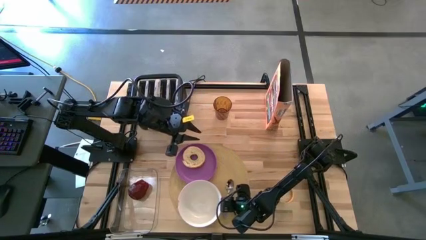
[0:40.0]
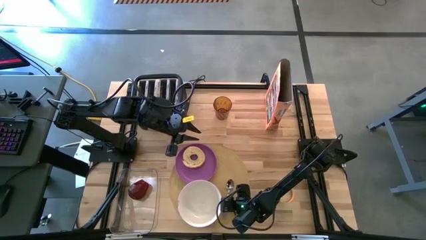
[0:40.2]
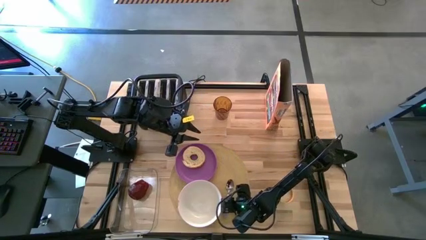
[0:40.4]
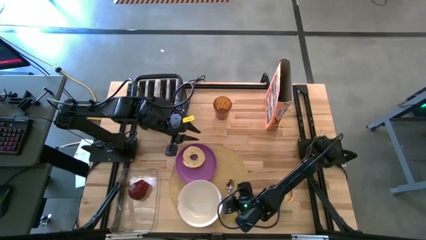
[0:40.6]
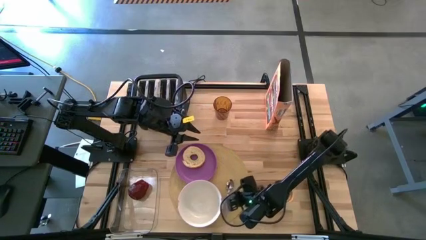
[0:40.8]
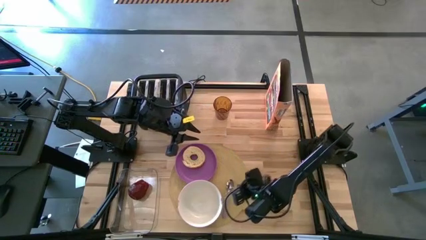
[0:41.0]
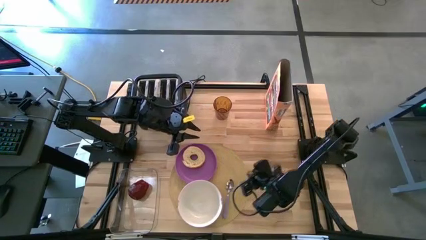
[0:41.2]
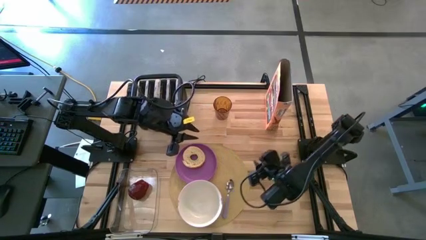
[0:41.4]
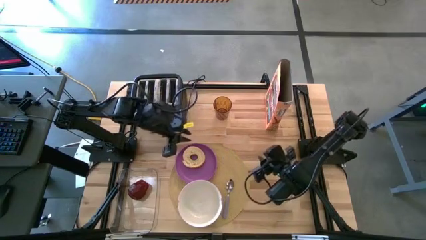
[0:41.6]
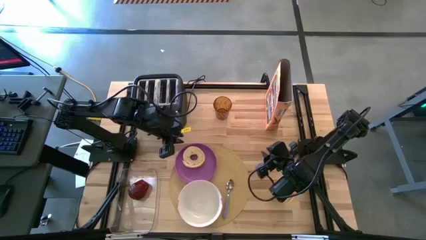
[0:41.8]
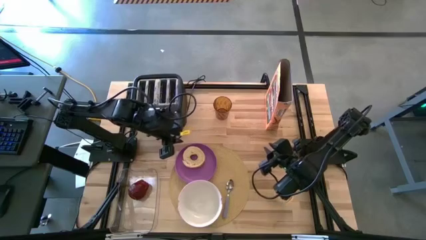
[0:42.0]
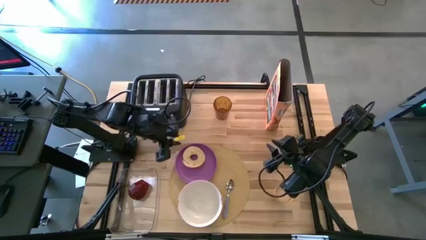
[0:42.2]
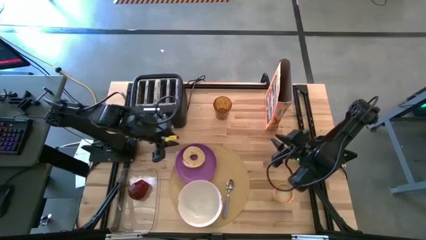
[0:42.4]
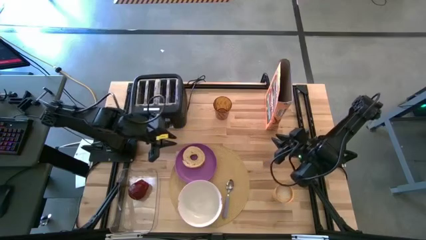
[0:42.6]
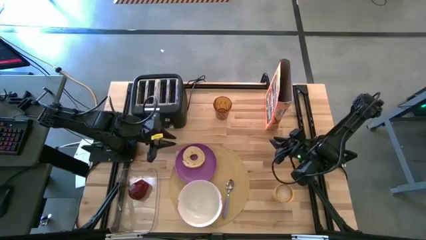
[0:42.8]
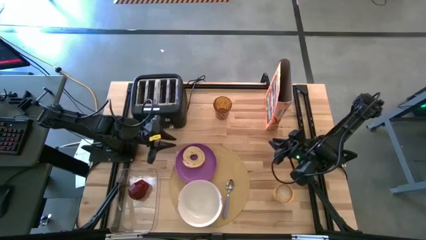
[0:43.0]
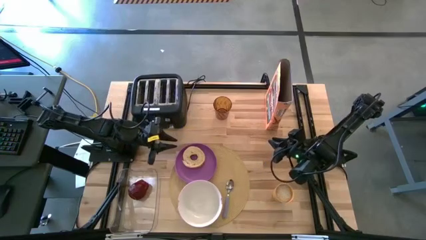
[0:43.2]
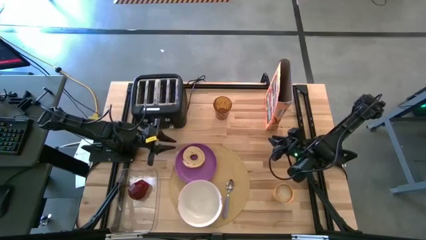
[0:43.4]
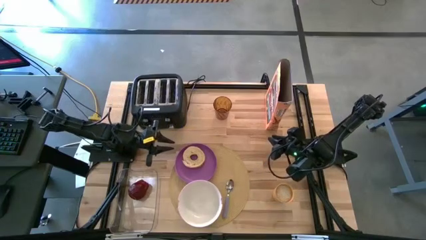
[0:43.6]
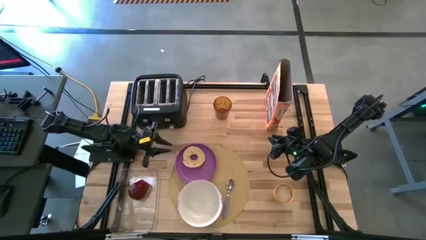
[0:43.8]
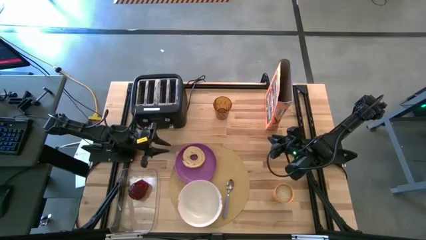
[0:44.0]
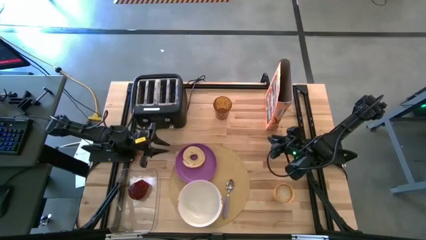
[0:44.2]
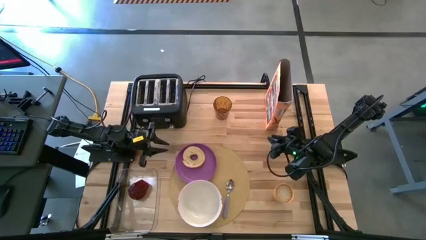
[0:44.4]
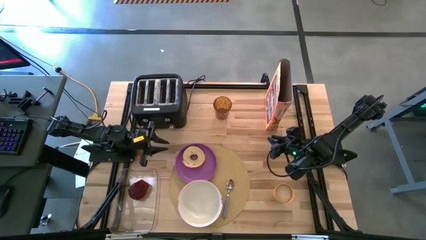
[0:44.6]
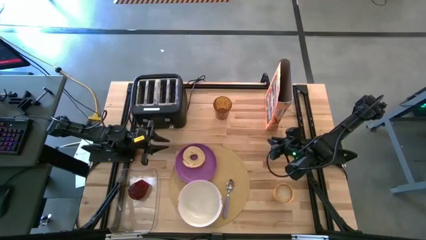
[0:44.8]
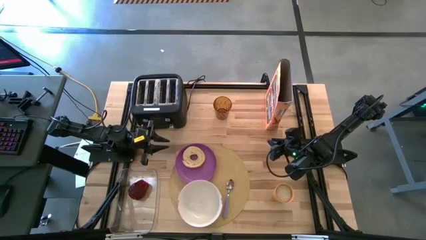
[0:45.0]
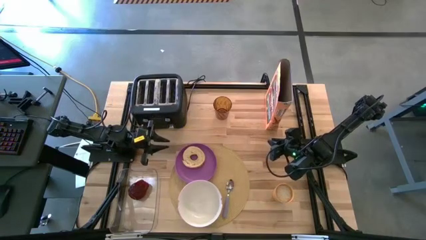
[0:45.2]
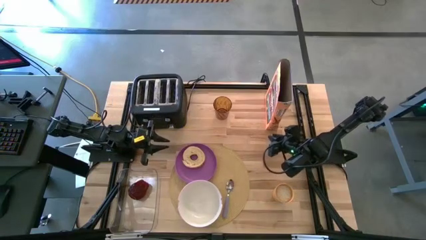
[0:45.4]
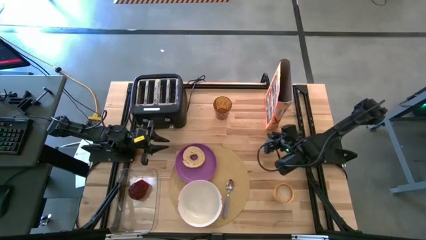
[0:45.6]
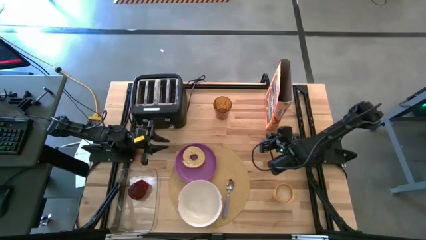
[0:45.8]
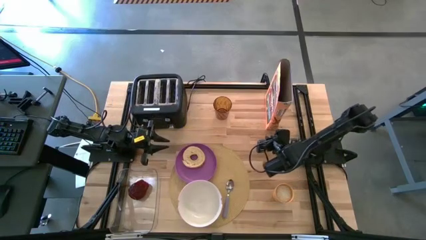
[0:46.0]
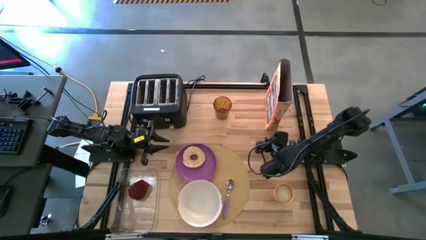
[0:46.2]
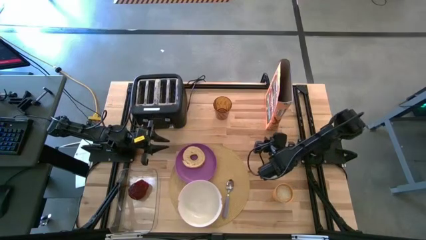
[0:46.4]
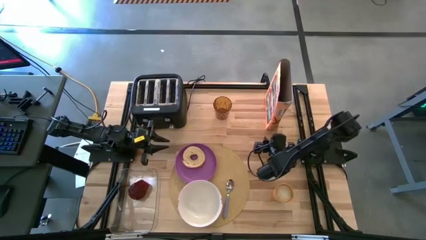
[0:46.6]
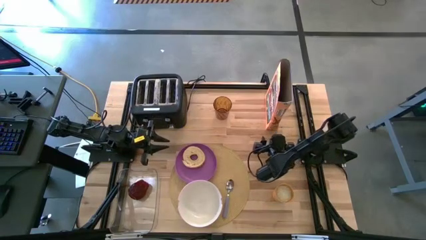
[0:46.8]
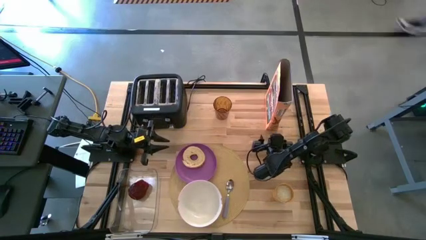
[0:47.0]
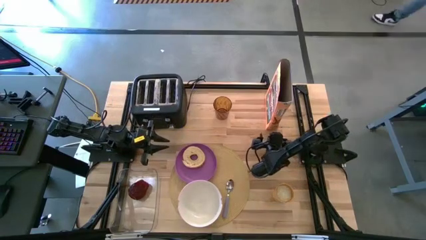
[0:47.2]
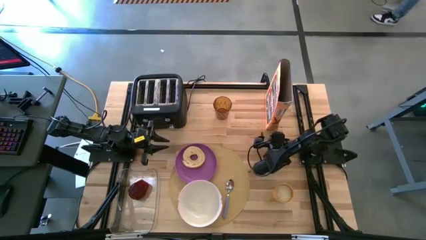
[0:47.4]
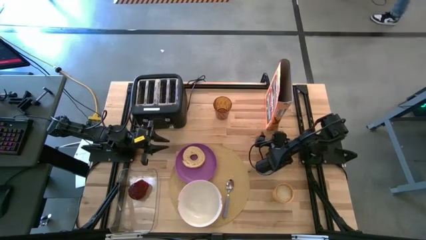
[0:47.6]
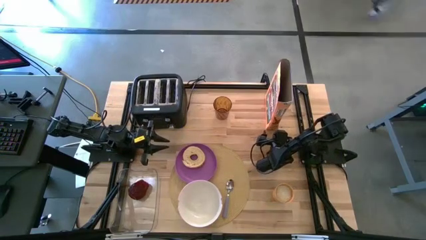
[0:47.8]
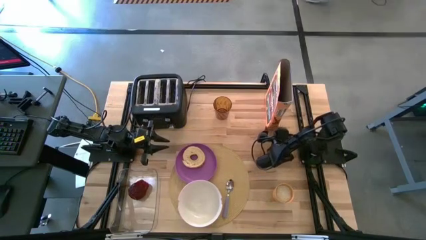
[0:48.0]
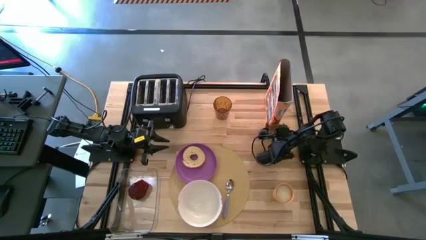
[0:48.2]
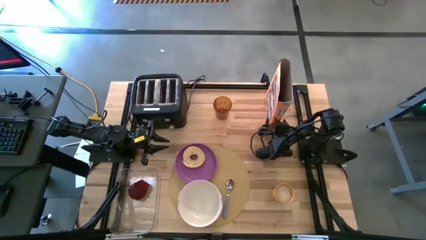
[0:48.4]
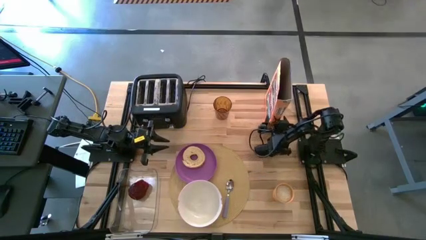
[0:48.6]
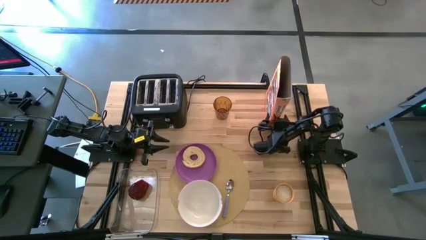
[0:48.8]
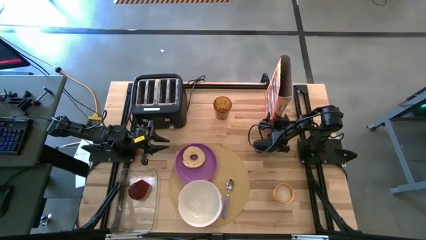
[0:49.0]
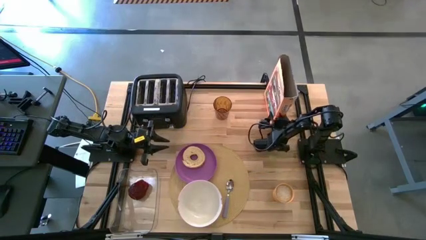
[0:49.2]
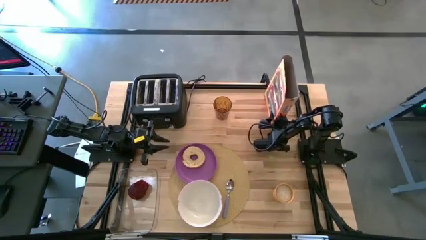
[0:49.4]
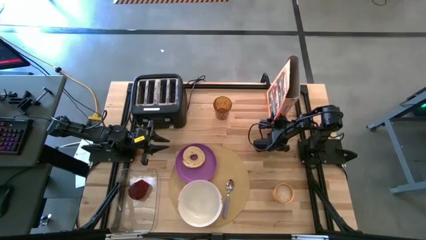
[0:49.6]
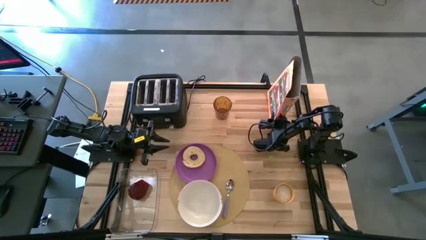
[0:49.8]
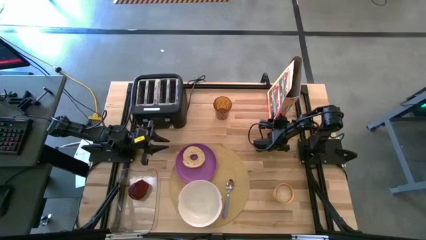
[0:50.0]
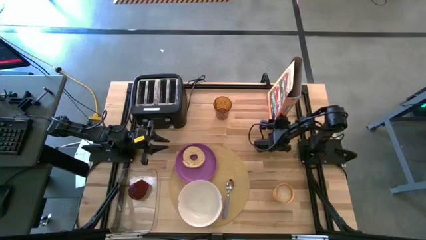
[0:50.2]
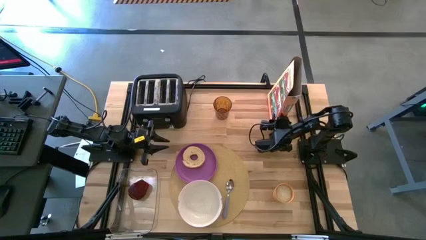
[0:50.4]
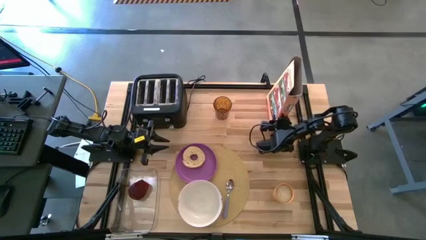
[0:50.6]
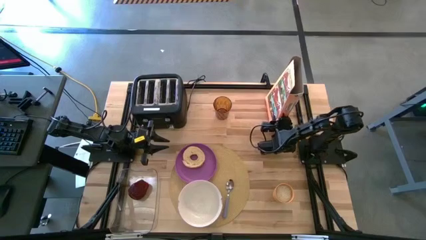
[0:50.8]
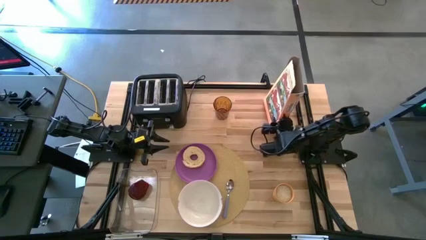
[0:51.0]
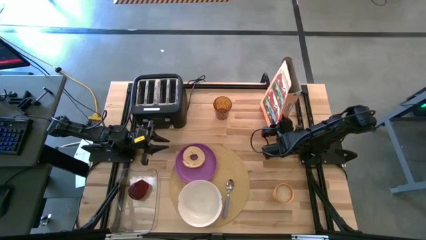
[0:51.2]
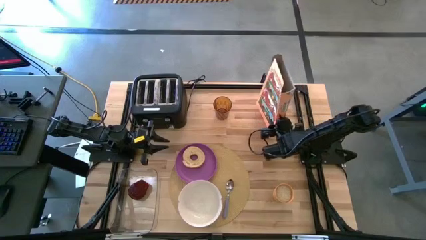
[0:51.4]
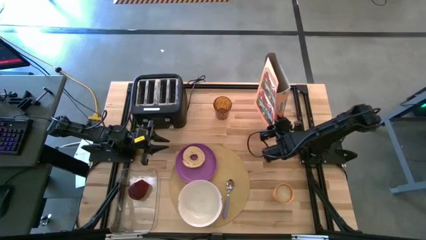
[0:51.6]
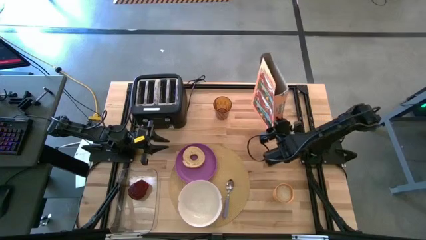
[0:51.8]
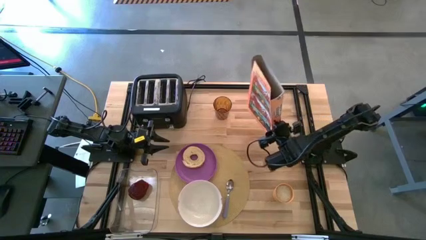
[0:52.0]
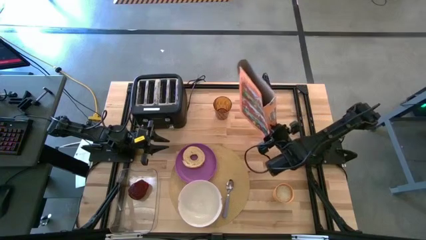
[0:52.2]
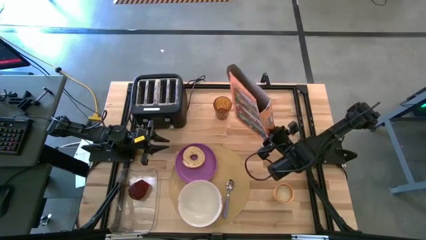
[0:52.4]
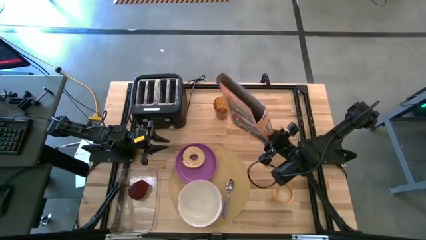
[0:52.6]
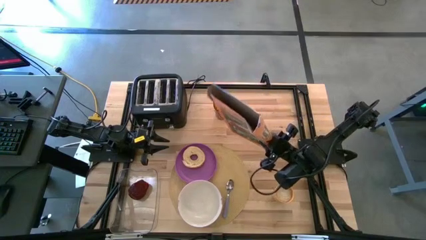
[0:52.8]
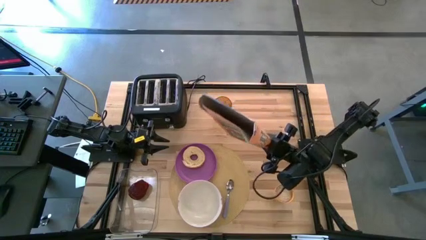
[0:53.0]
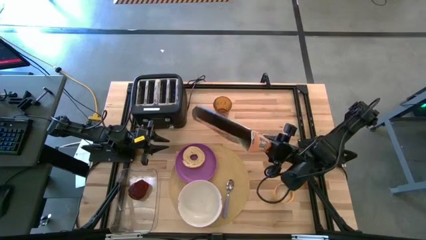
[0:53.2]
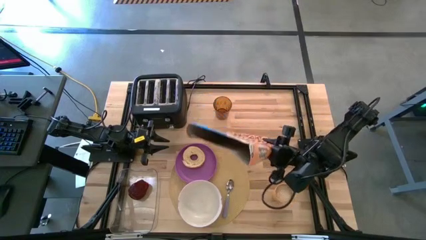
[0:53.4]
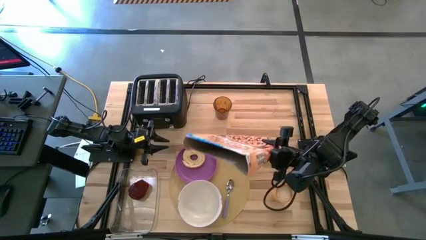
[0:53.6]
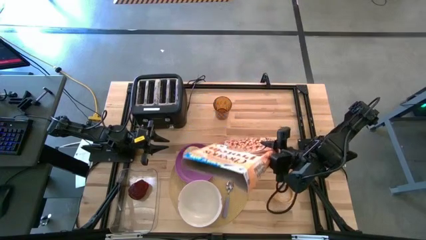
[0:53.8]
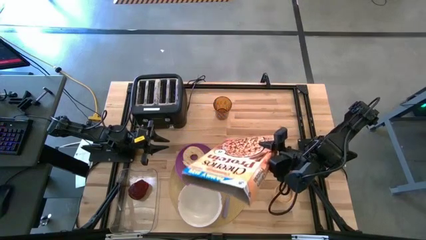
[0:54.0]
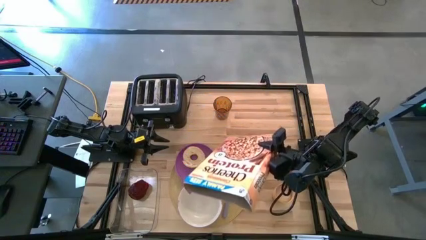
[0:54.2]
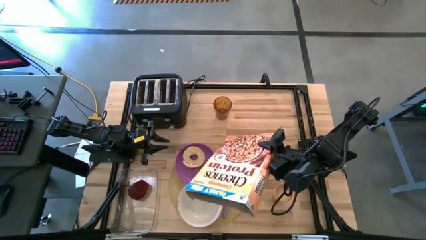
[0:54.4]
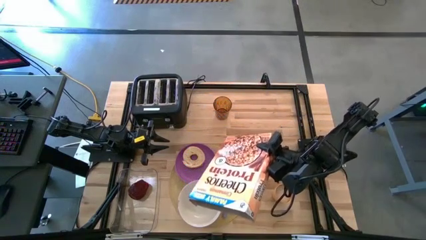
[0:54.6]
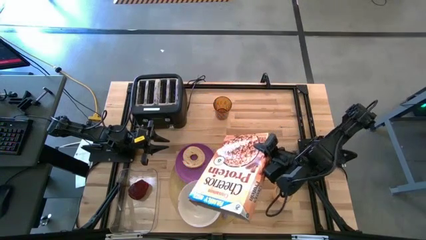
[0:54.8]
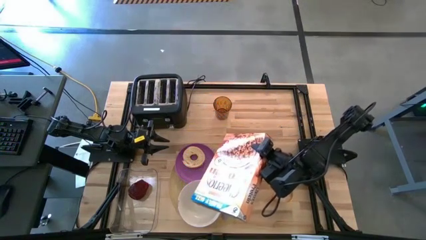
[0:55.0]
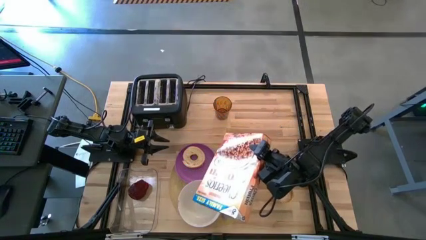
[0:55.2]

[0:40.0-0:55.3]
Task: Arrange a breakfast setting
Pour the cereal from the box into the white bowl

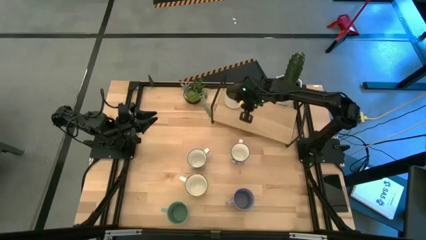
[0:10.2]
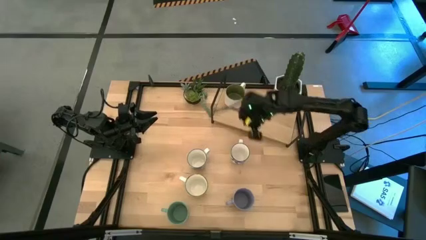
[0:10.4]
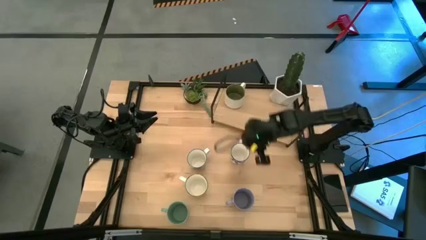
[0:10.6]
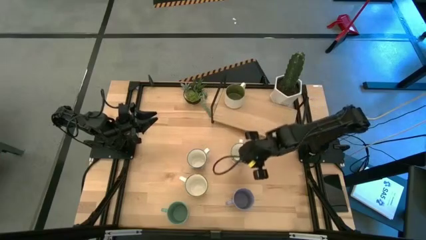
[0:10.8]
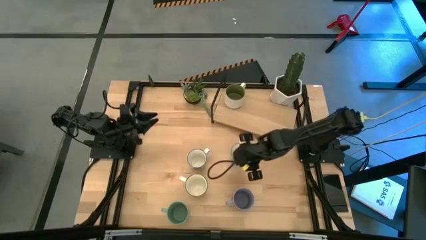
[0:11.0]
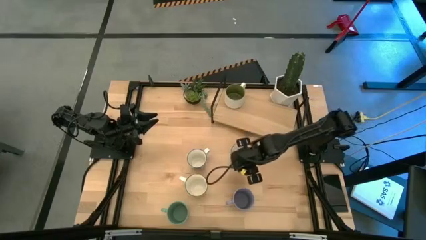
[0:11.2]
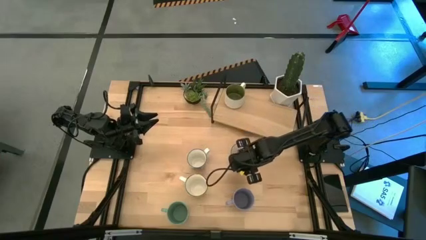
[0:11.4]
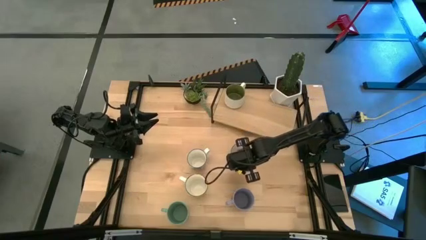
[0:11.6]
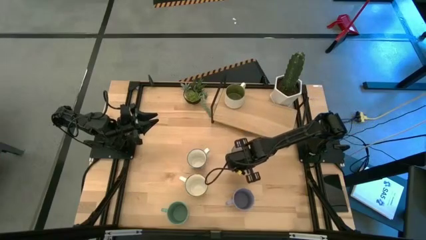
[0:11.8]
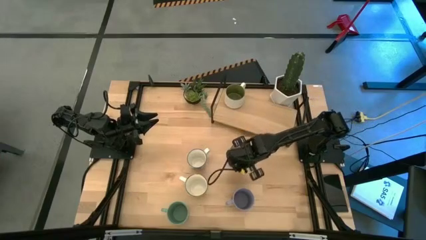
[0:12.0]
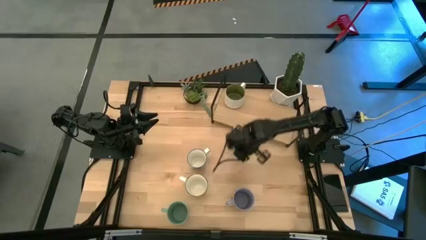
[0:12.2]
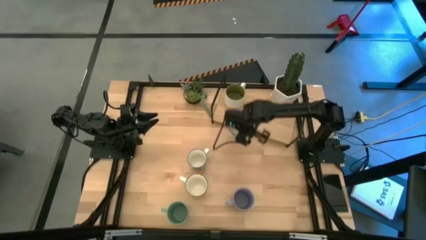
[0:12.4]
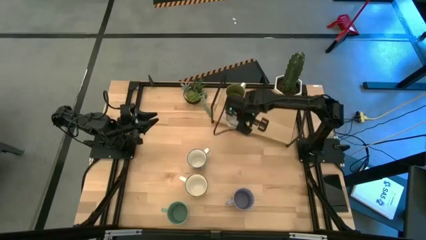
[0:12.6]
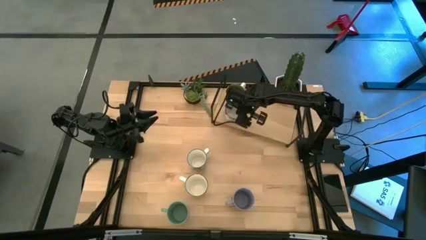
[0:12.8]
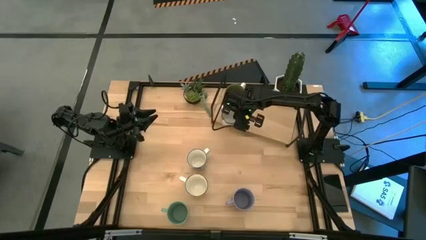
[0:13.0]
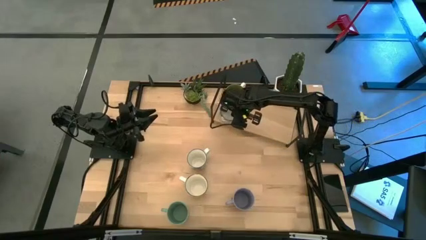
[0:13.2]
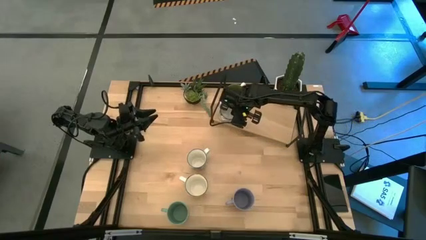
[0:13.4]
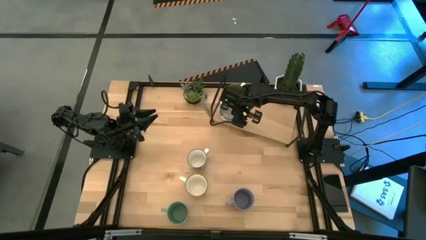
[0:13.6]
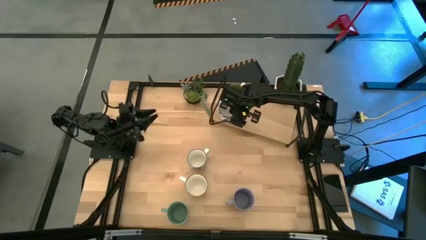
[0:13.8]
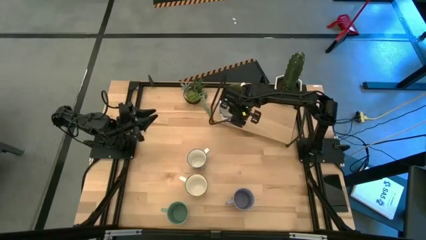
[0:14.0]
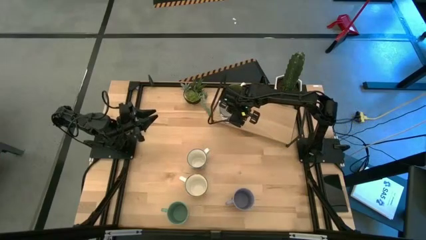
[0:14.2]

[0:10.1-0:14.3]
Task: Place coffee mugs
Put the right blue patterned mug aligned with the white mug on the shelf
